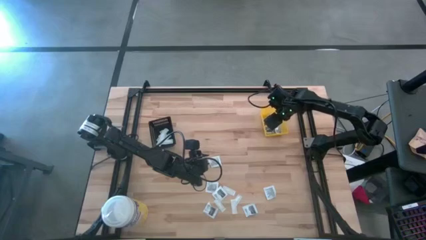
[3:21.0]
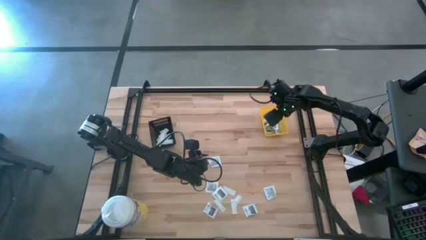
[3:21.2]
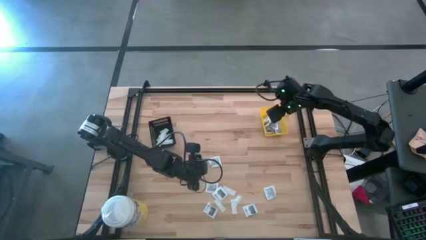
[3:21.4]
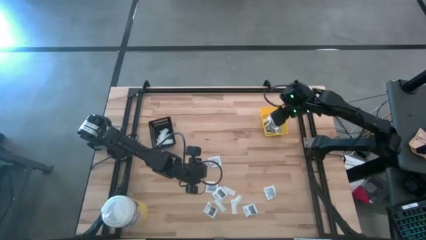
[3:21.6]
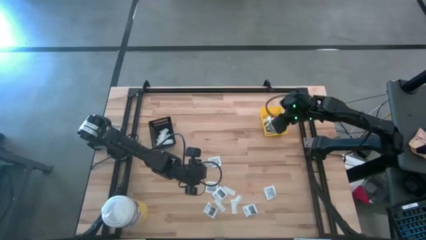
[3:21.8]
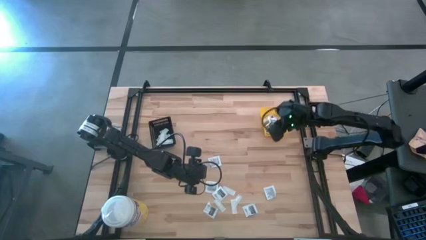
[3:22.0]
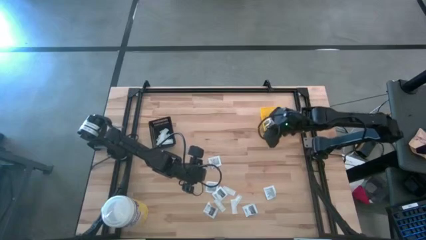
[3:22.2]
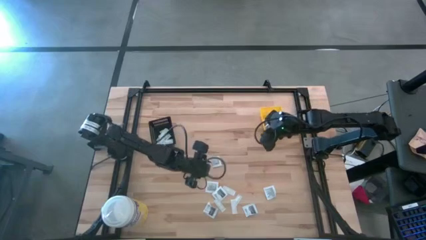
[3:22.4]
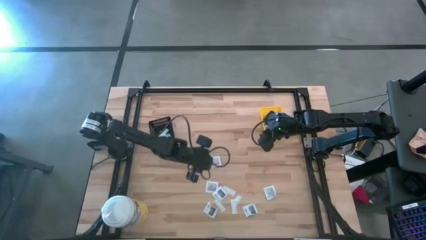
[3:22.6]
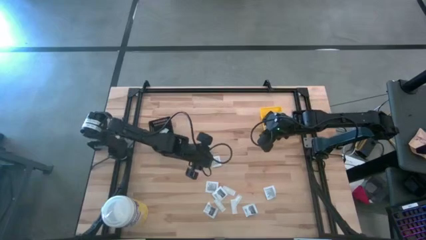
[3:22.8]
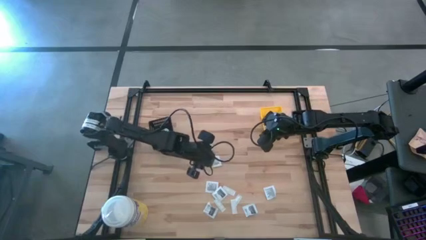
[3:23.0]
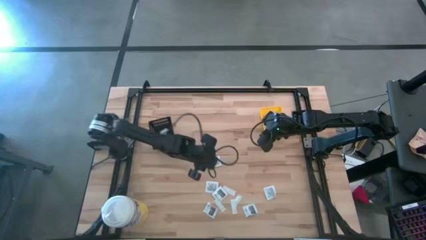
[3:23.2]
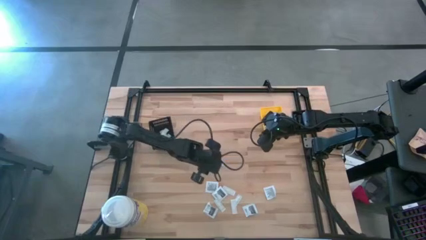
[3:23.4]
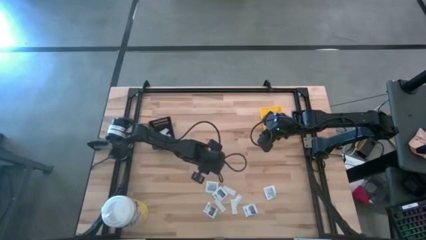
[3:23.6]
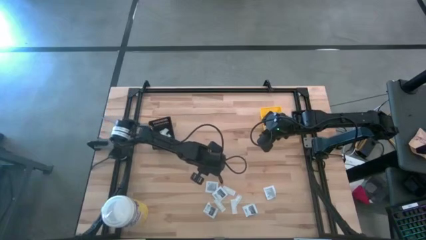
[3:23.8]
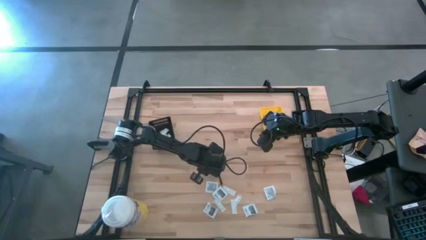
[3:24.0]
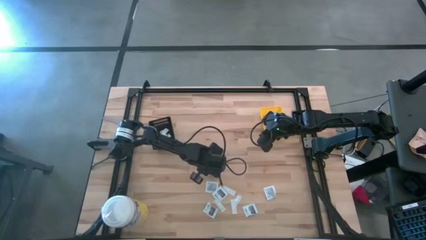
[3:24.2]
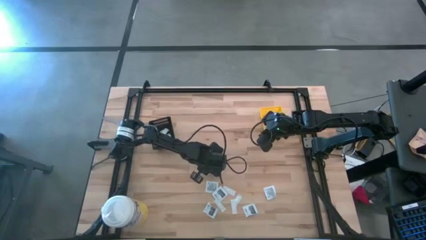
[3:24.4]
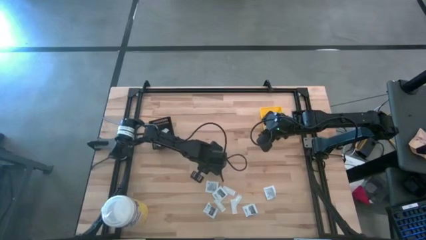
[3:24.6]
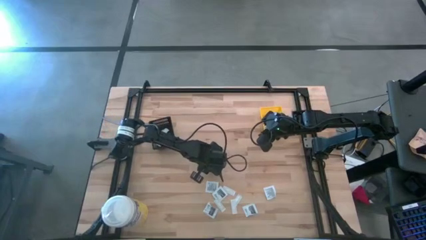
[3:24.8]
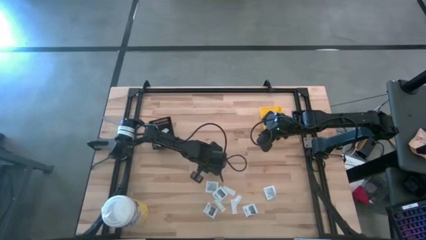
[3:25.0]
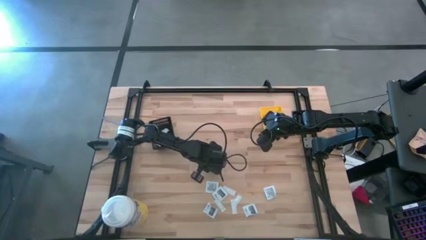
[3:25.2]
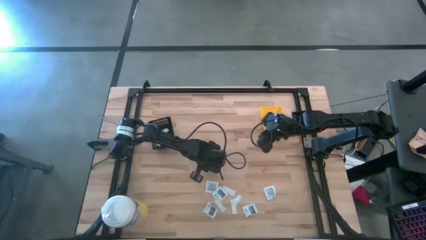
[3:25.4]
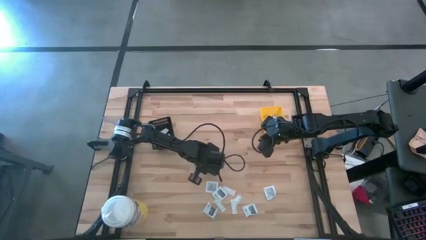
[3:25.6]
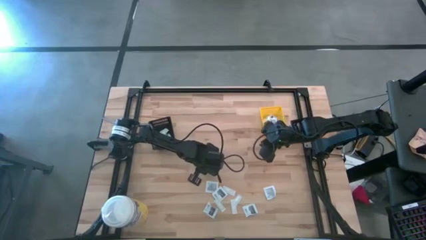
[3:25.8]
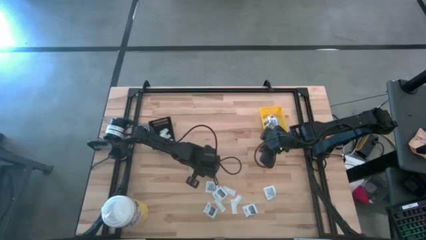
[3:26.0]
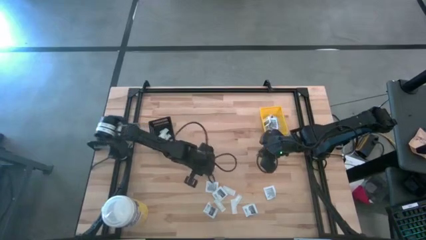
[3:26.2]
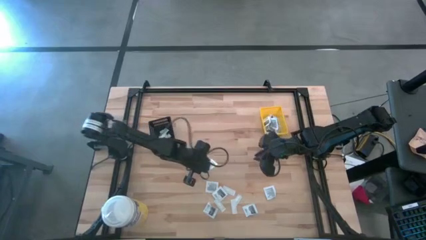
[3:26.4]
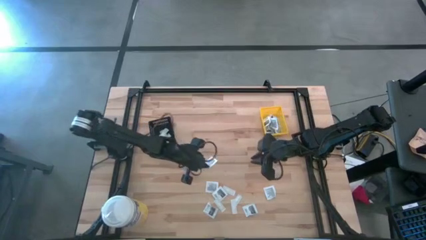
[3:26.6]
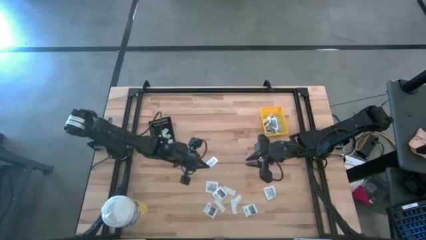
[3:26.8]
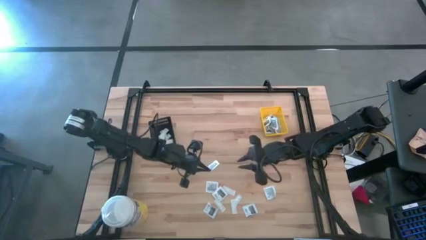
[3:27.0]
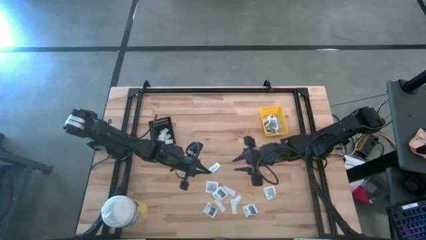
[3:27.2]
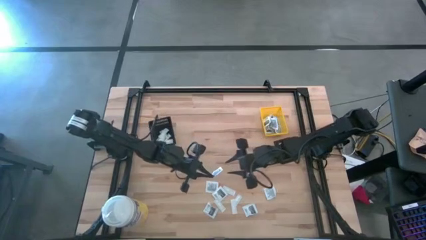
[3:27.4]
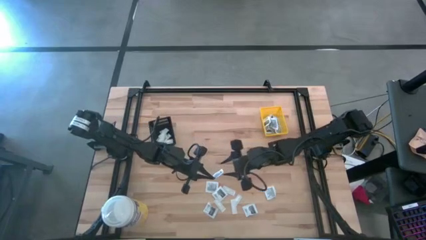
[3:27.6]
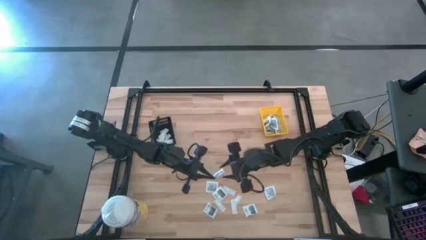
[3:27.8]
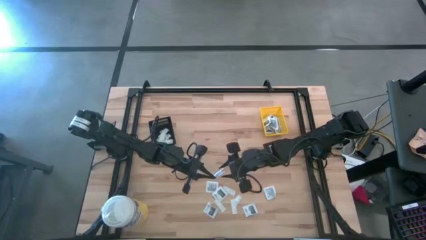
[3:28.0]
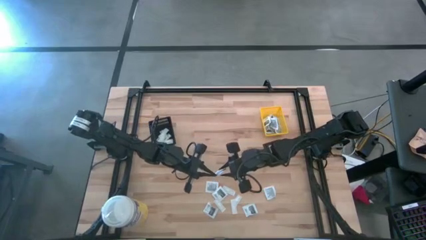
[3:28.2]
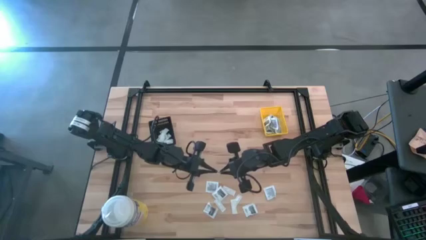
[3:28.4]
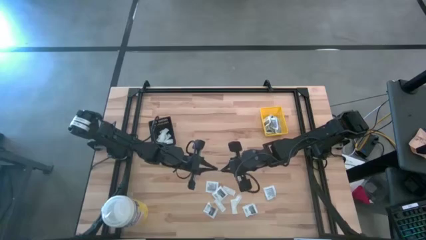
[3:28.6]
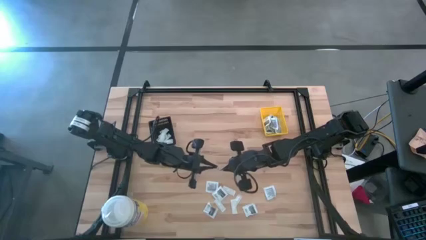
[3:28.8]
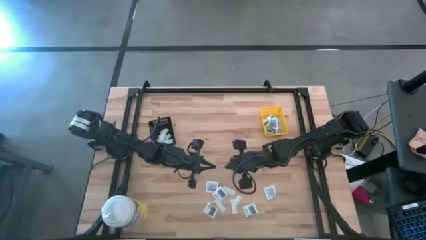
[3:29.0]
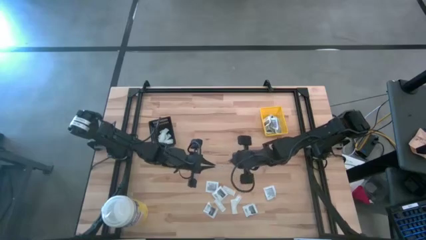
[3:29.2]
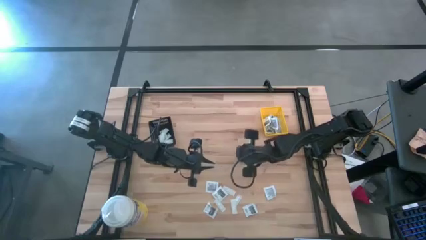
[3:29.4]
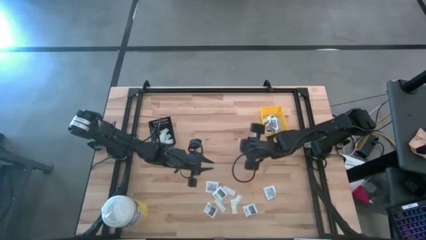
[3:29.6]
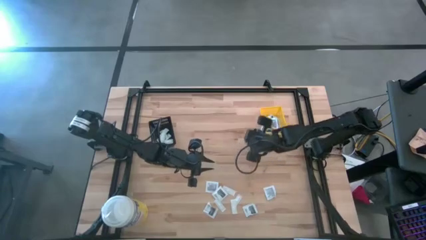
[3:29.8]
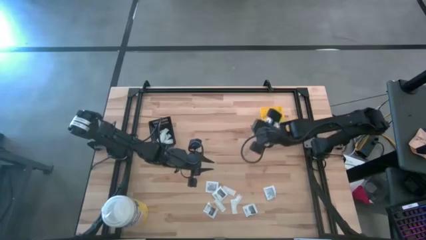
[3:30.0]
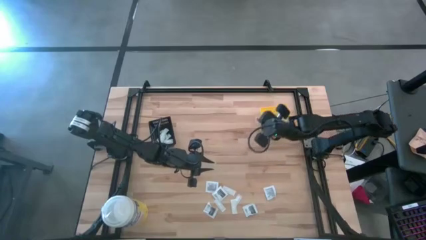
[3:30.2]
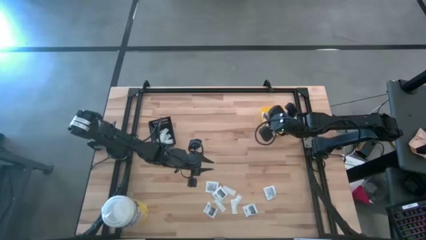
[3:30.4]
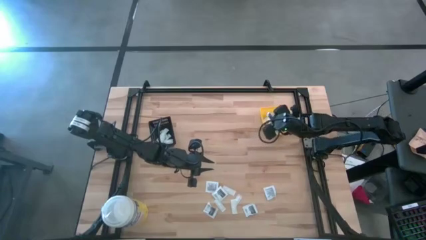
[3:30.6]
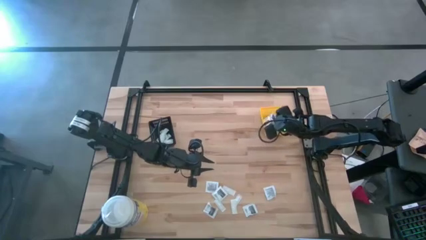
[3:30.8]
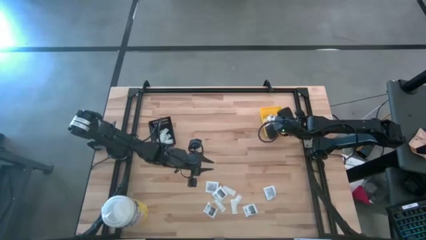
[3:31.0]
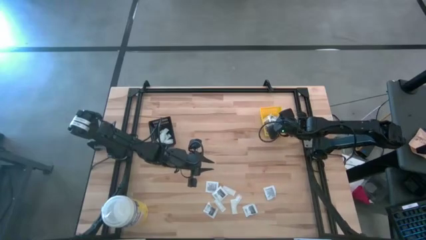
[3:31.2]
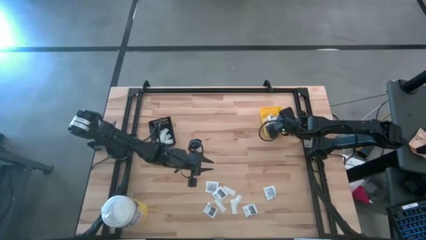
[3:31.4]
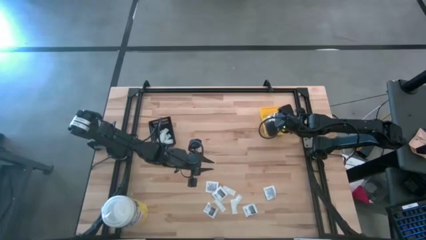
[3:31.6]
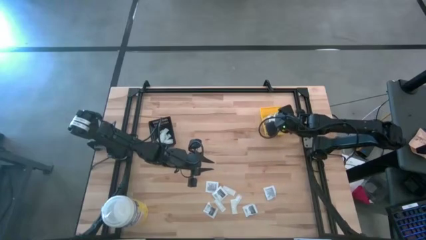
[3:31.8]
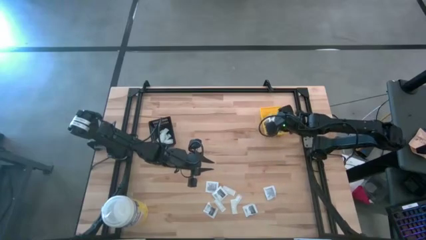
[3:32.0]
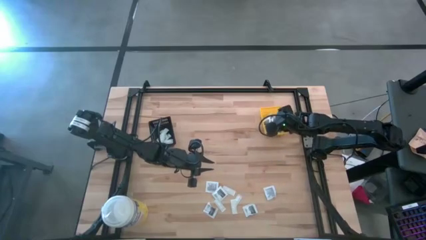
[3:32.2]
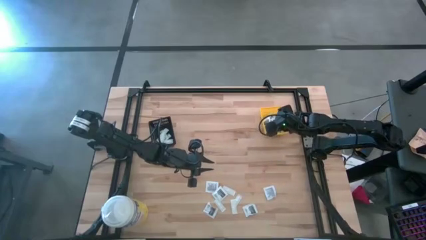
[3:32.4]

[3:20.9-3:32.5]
Task: Pick & Place First Aid Supplies
Put the black pad into the yellow bin

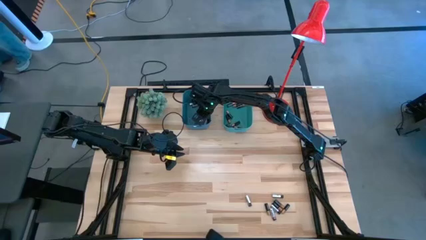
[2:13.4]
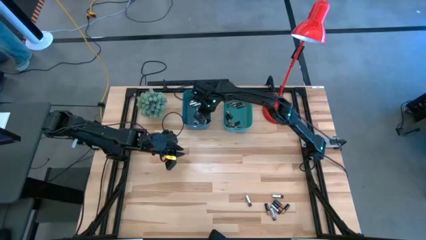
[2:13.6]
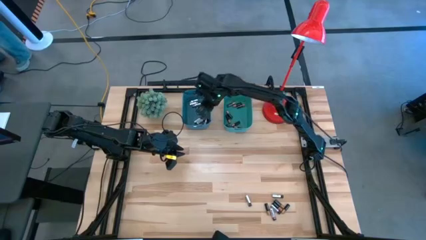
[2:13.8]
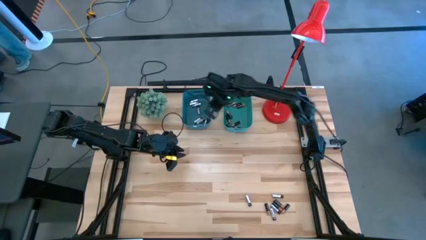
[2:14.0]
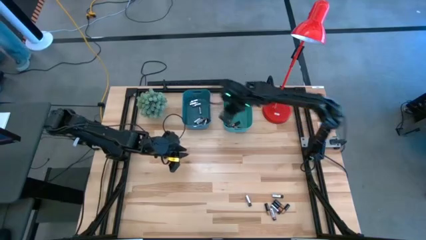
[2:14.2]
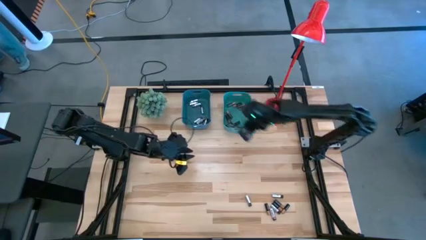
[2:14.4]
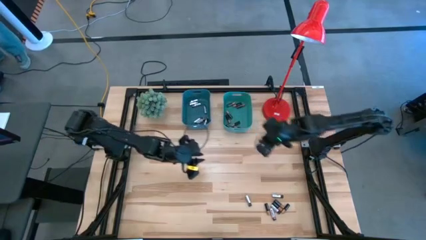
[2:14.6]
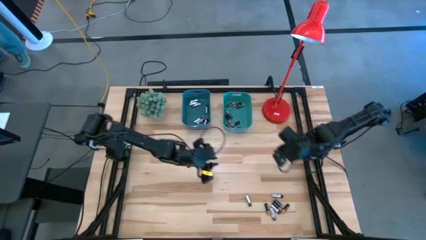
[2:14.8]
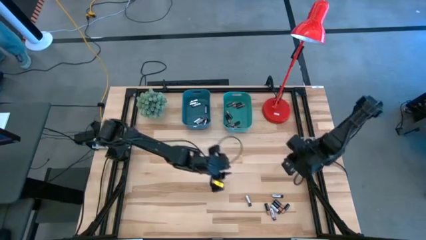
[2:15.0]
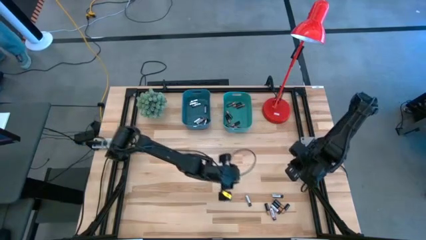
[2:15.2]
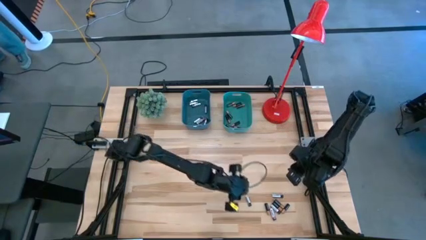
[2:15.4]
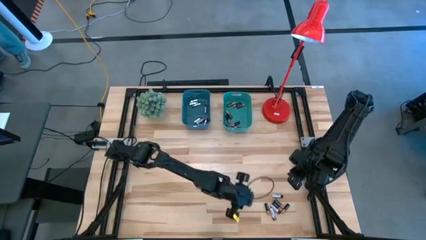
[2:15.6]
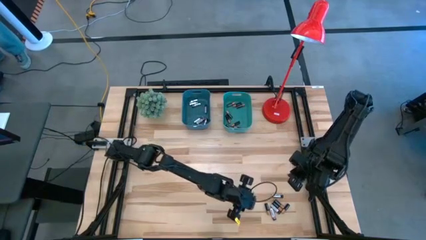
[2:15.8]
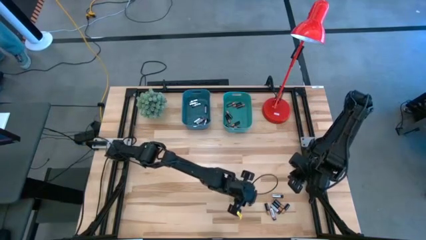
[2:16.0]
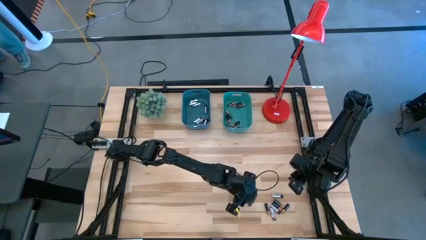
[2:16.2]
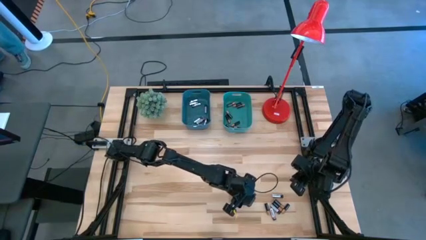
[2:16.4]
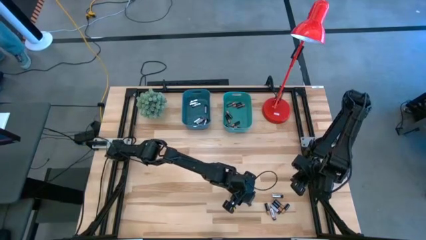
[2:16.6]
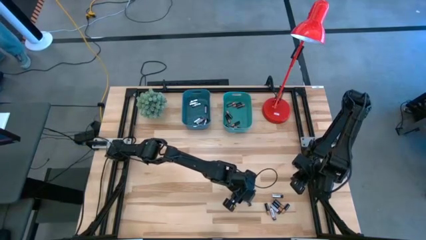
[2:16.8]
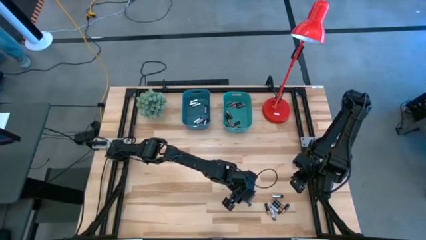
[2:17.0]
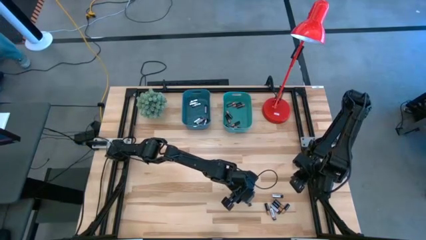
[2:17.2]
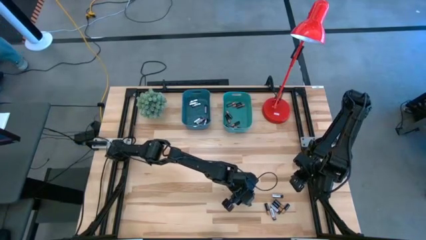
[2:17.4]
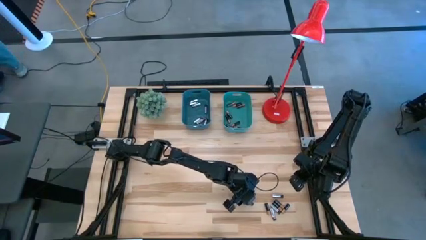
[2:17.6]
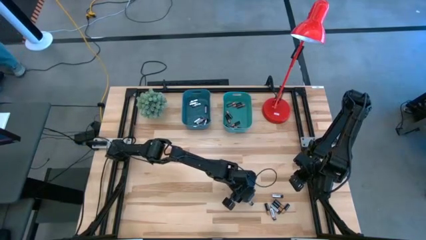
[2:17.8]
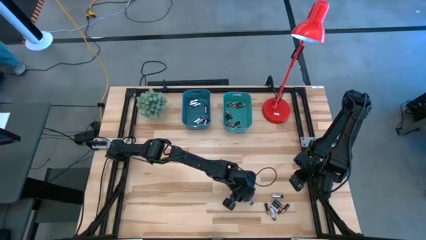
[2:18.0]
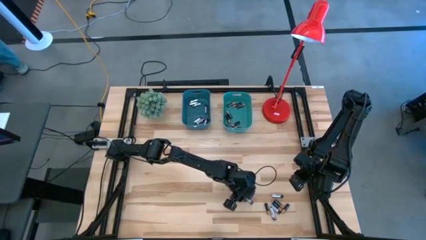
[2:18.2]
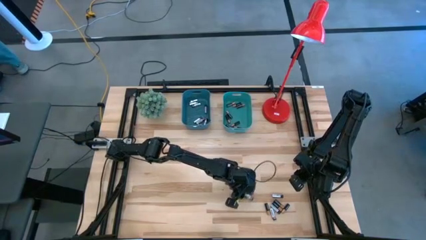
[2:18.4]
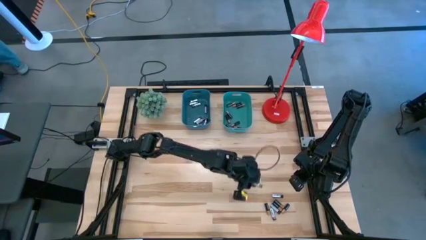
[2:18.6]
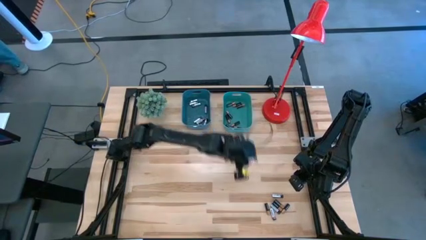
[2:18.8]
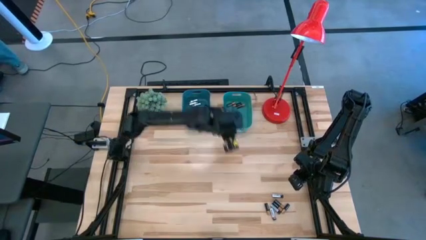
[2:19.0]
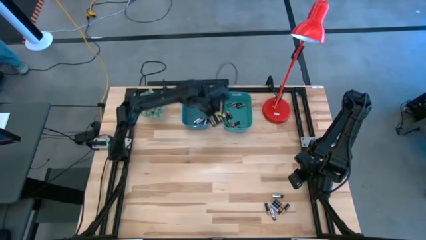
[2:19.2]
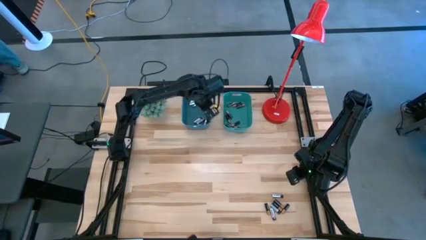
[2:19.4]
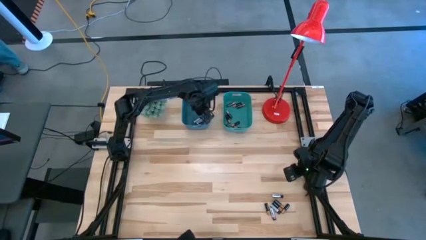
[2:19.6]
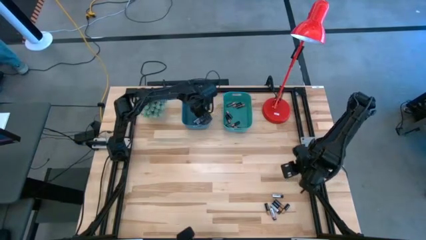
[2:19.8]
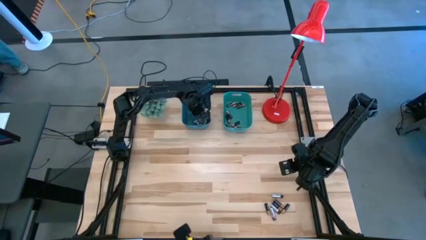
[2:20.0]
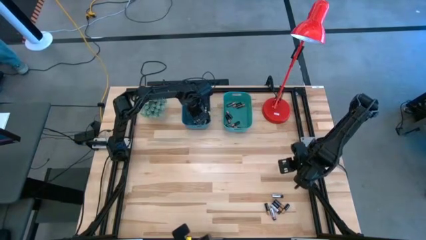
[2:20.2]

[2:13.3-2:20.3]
Task: Sort batteries
Put the silver battery into the blue bin
